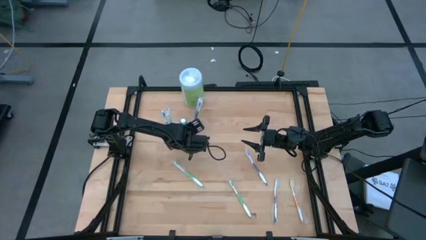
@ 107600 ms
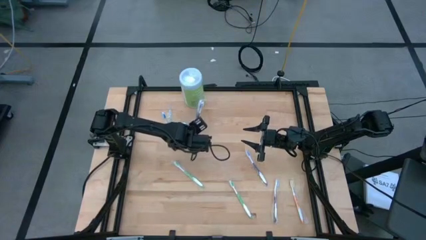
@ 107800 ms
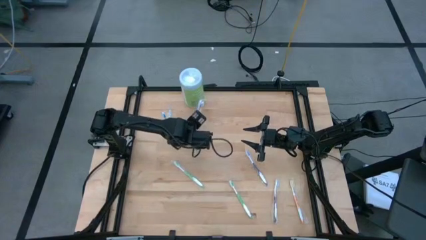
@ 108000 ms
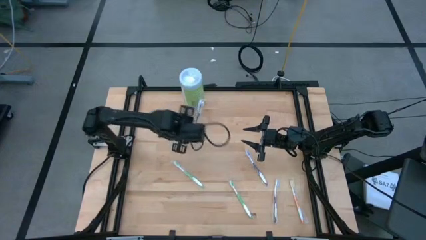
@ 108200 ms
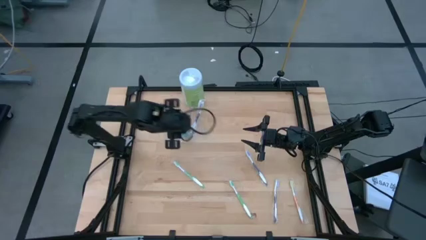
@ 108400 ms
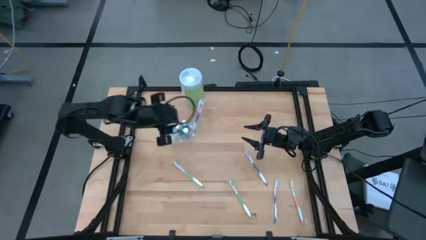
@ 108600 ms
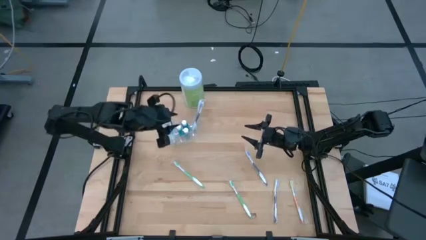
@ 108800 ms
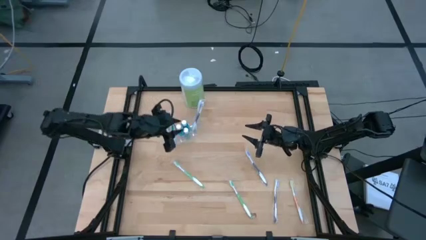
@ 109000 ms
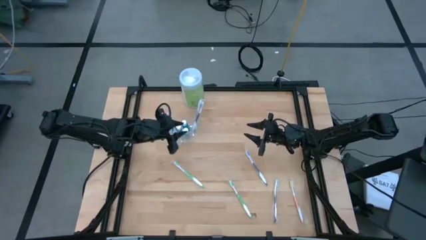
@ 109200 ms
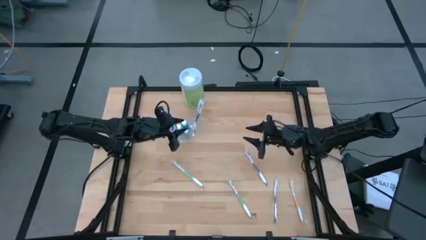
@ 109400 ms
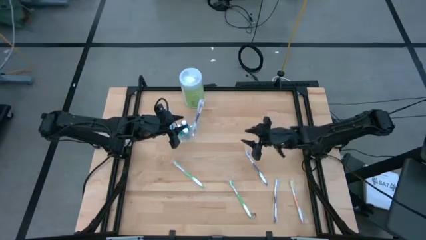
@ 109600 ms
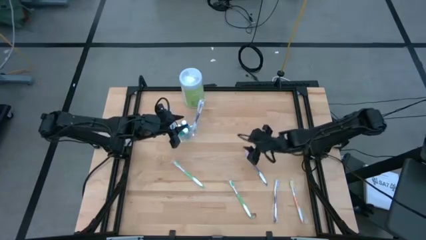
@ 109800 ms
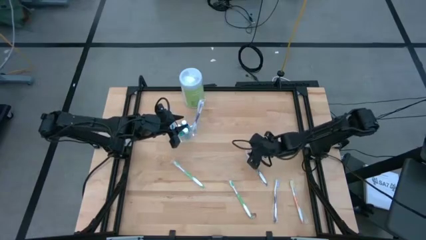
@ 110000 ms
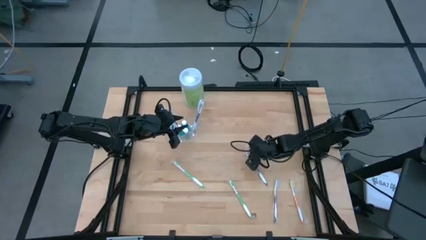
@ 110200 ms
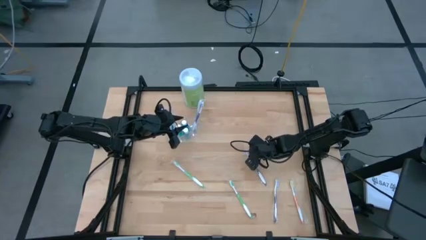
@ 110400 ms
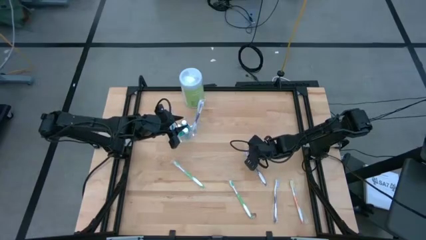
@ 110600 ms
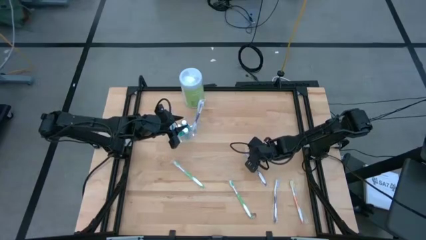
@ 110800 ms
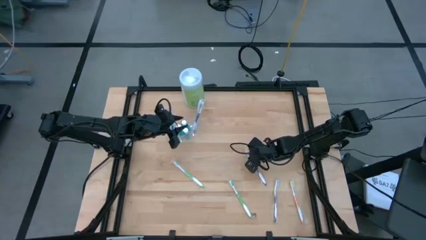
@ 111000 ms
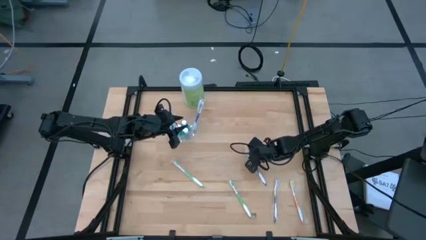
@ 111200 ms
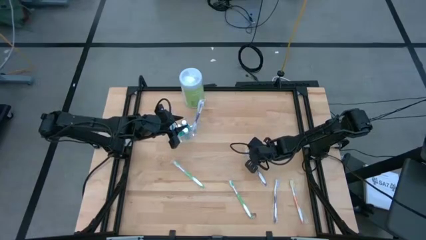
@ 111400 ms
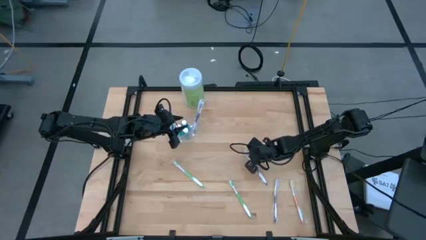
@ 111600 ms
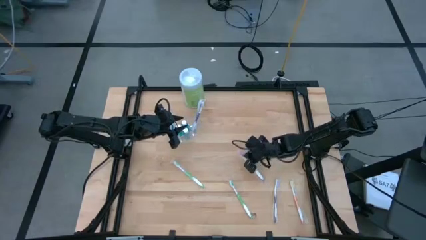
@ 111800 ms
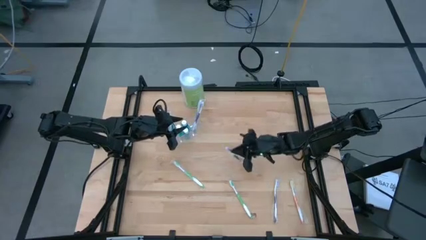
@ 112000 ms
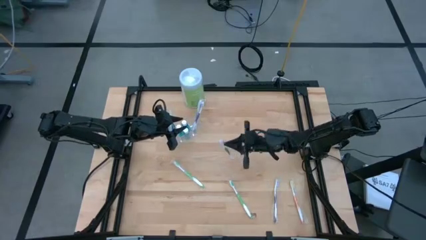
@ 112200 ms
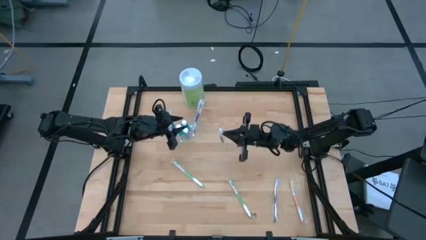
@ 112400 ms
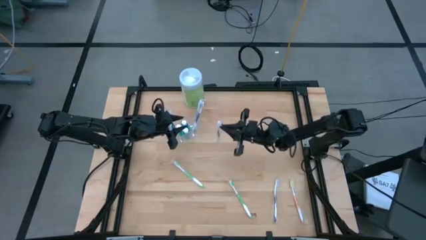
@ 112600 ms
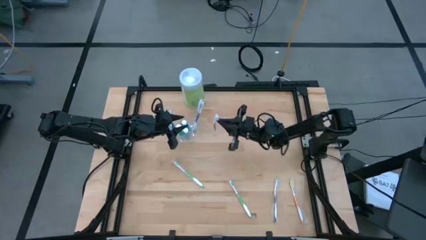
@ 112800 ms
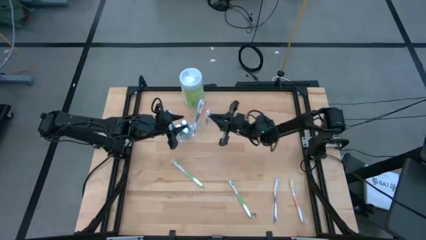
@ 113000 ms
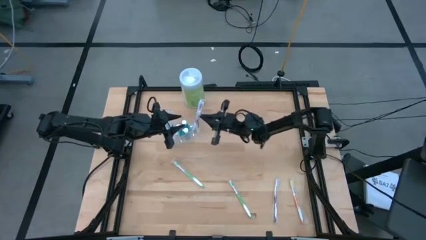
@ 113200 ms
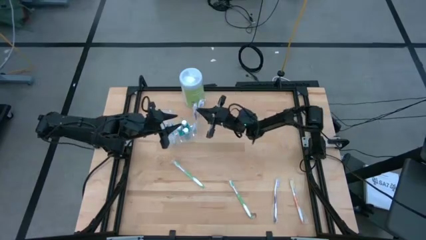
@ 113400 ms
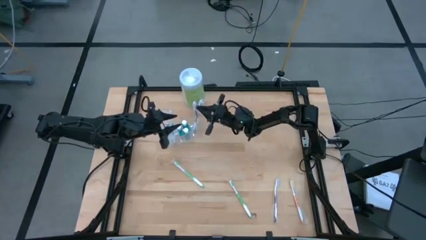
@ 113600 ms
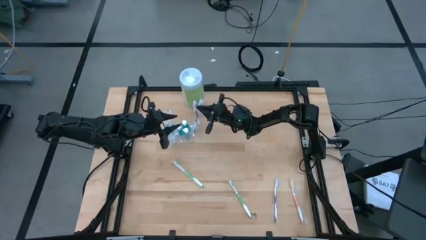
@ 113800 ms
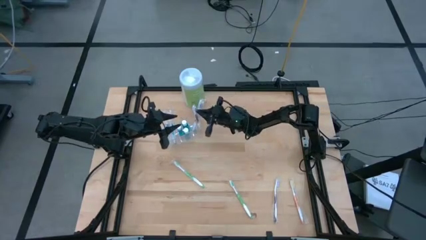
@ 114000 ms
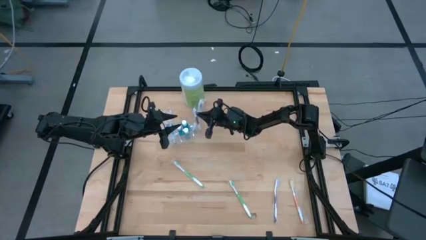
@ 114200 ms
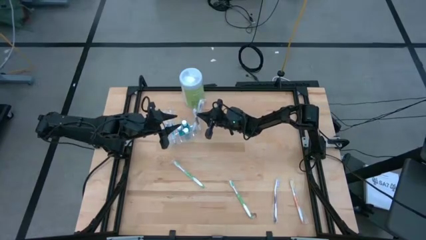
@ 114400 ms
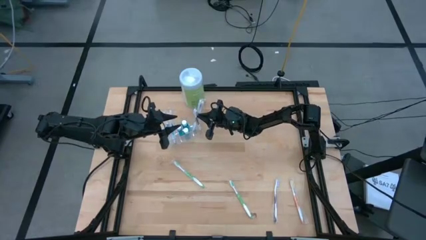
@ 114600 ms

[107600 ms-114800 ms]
Task: Pick & Place toothbrushing station
Put the top purple toothbrush into the transparent organizer

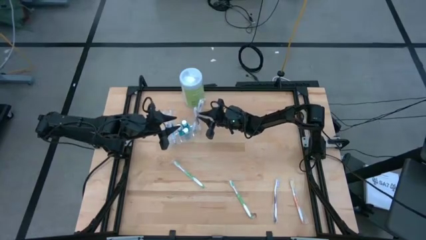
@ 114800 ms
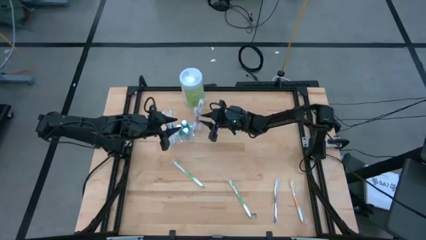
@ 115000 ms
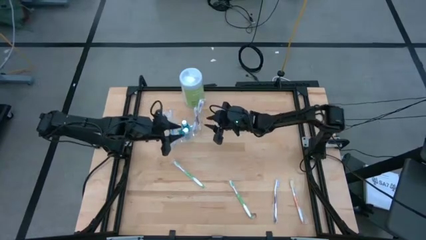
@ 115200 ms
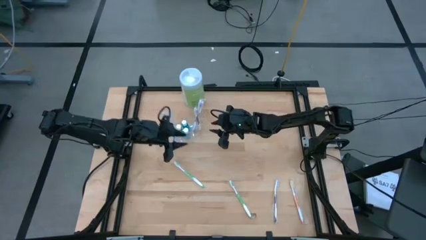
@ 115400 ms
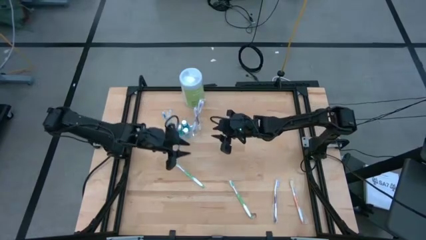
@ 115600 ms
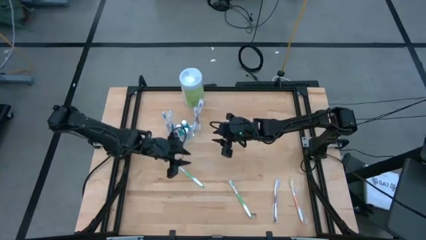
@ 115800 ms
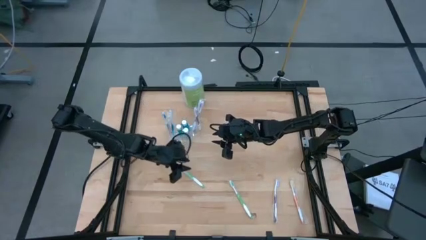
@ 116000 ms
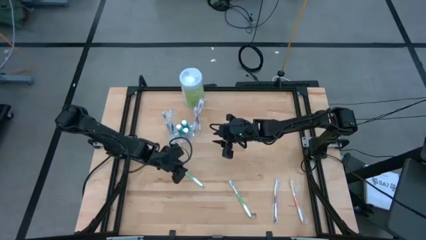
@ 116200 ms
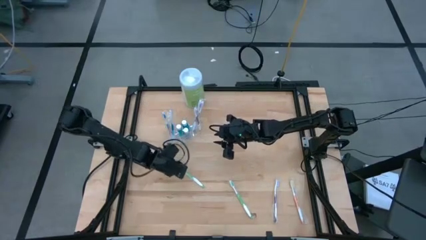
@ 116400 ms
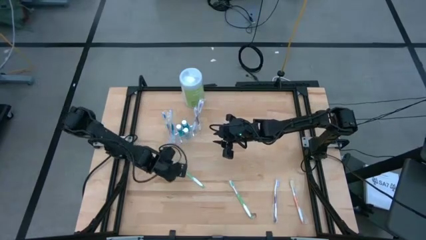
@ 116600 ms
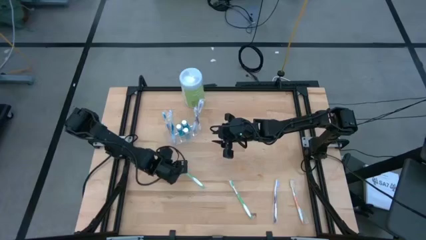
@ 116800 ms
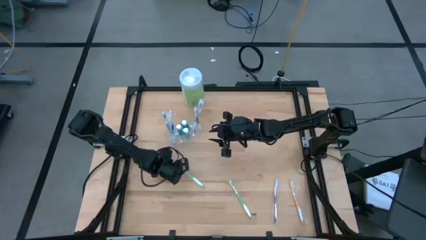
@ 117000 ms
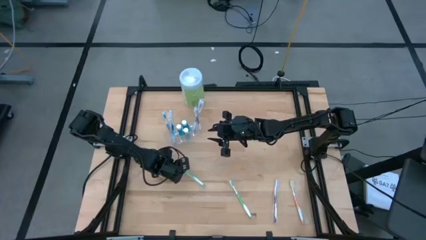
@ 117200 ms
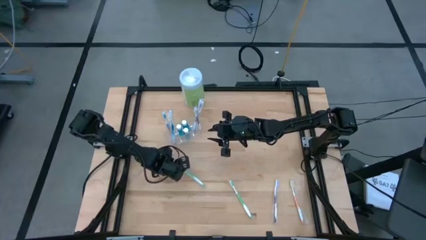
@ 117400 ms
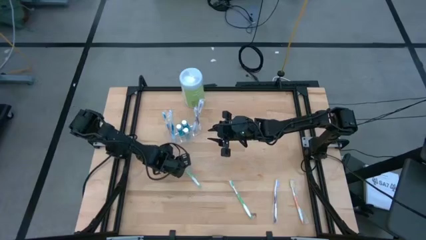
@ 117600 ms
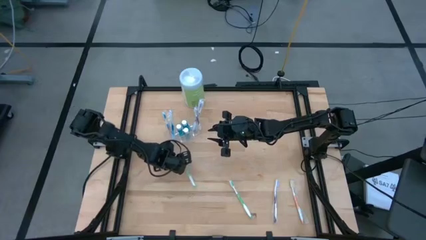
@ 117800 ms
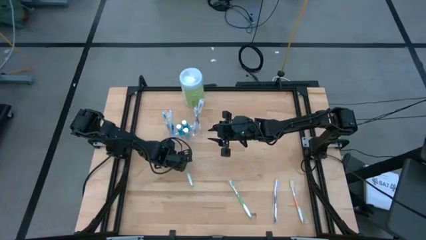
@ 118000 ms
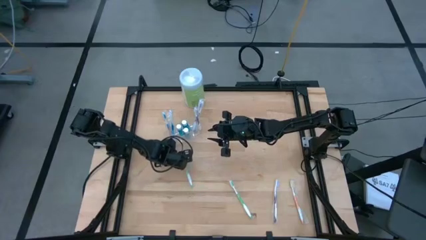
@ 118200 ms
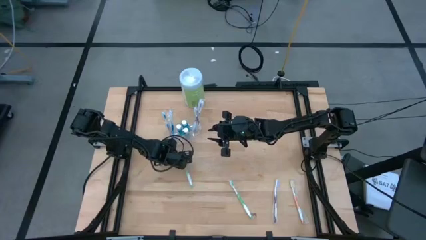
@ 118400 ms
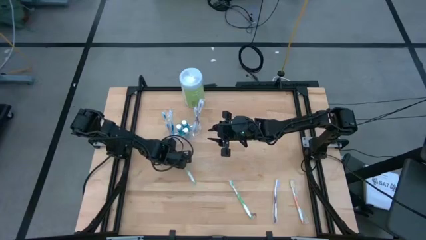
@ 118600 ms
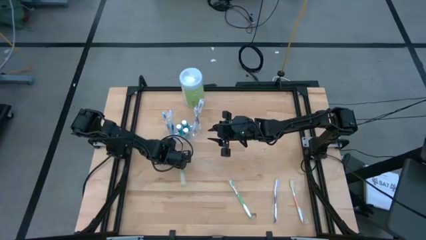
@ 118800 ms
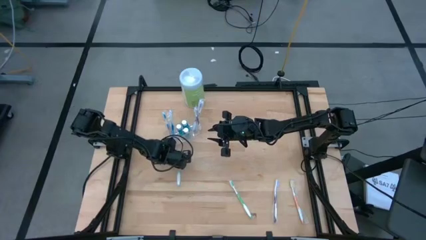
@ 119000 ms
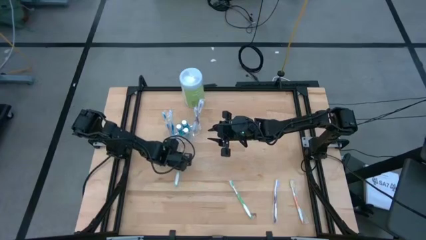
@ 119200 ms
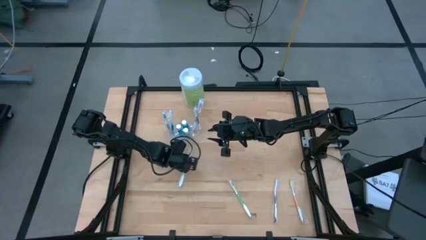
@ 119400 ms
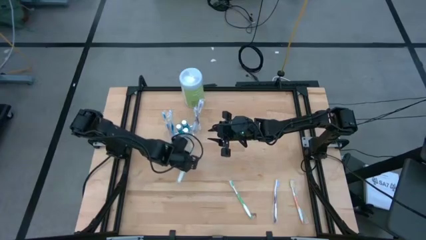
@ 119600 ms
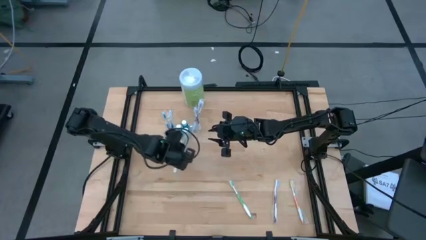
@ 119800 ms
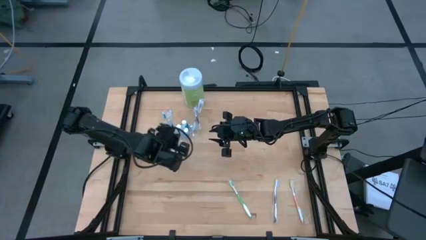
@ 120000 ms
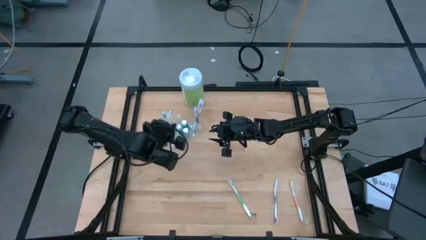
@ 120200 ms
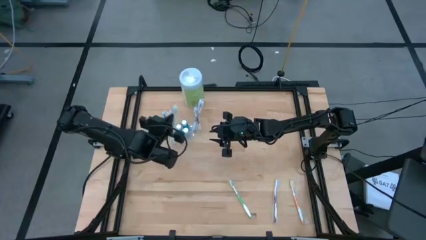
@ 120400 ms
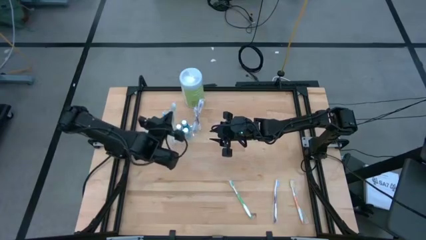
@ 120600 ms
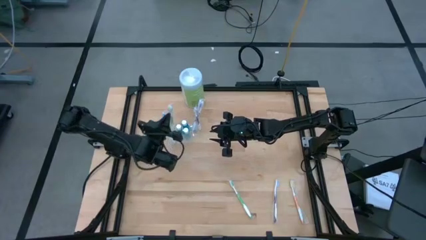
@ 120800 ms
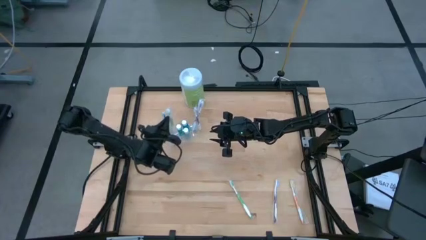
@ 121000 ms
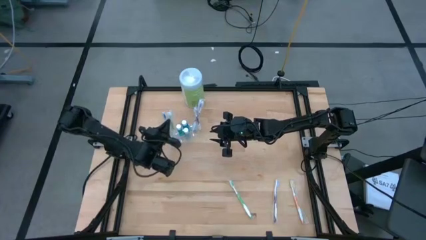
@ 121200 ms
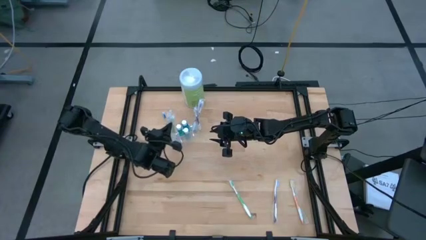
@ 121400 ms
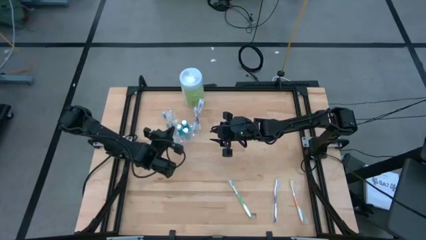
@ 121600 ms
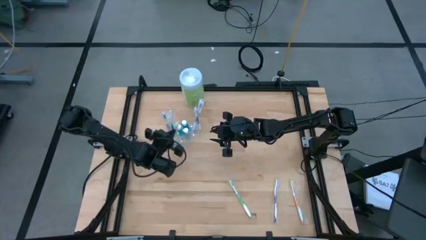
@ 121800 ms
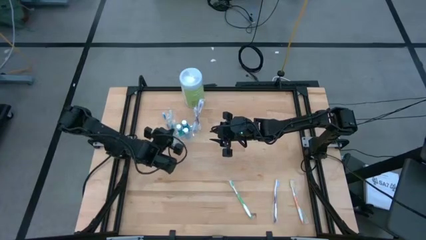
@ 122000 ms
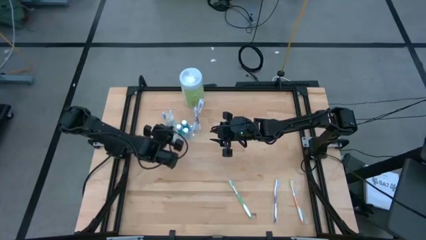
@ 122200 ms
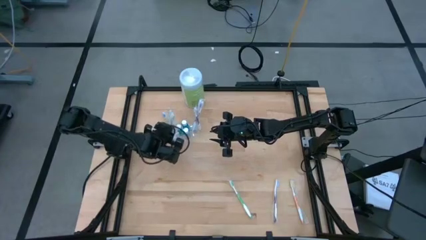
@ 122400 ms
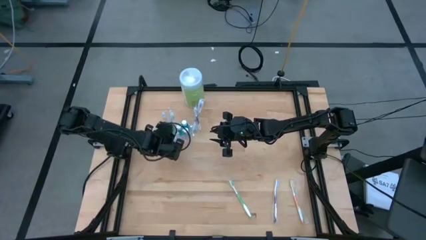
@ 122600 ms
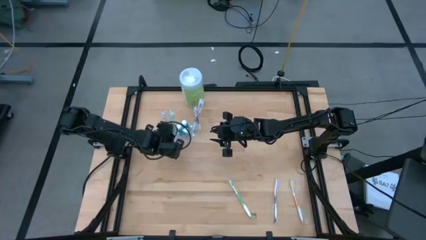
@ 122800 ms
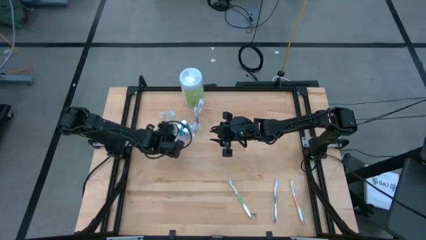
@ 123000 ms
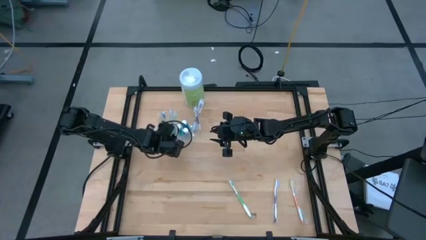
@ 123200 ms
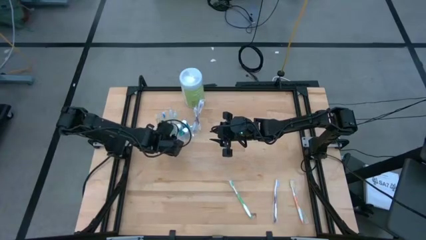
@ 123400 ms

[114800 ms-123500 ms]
Put the top green toothbrush into the transparent organizer

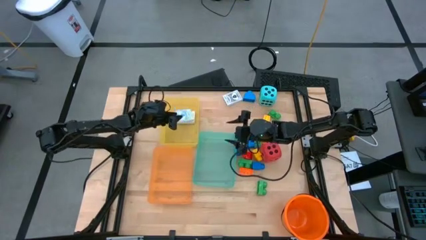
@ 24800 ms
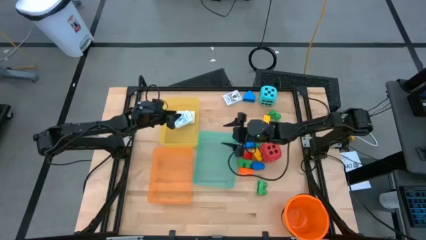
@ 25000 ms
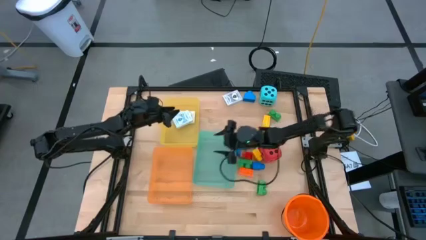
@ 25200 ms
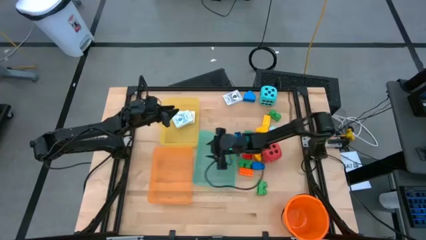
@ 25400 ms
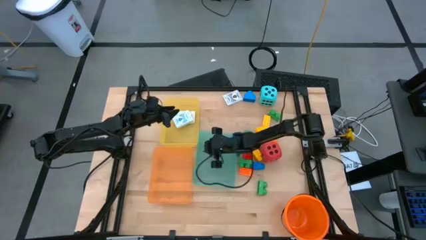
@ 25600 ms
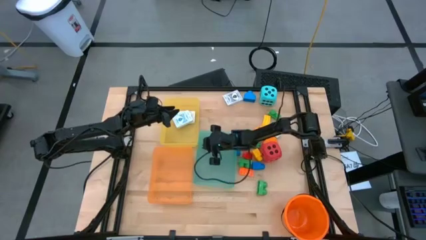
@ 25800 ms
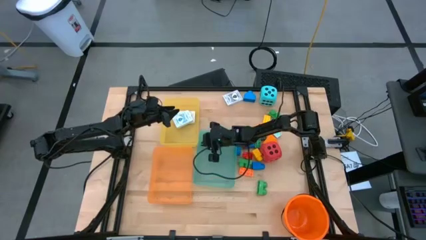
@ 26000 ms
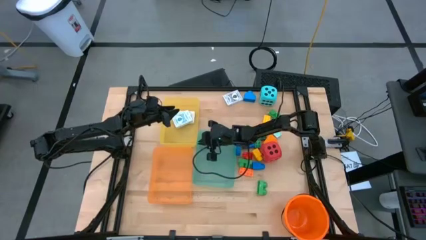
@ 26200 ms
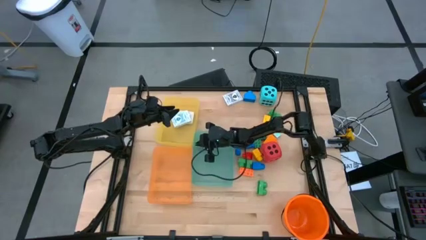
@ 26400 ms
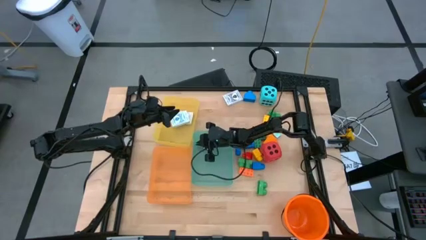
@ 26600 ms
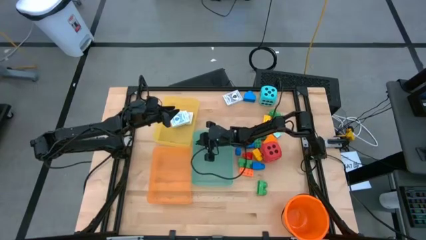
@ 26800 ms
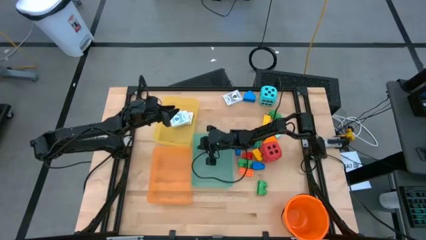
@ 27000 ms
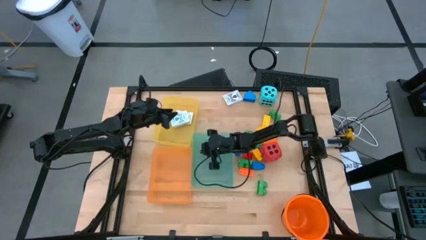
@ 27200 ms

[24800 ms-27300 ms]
Task: Pick & Place Toys
Adjust the green bin
